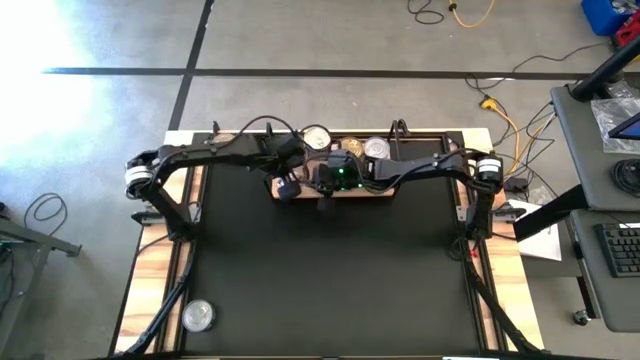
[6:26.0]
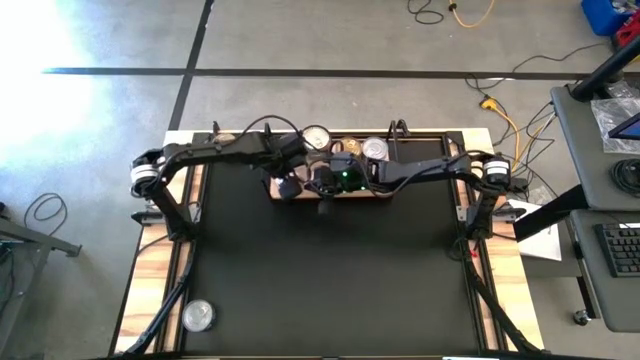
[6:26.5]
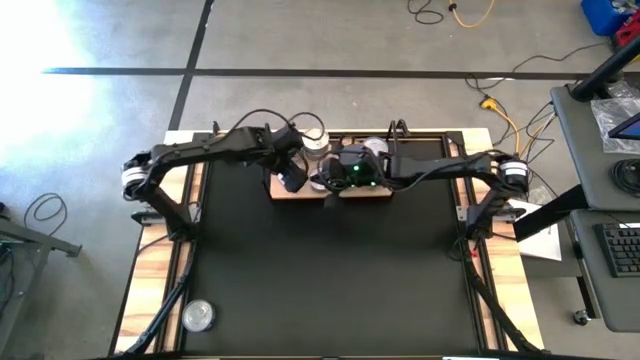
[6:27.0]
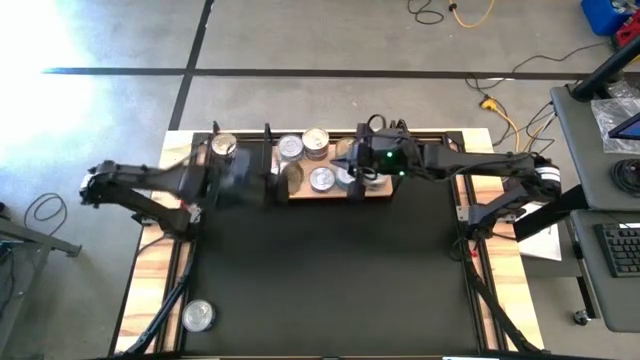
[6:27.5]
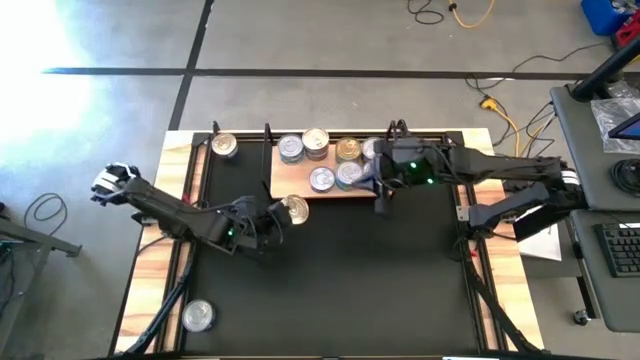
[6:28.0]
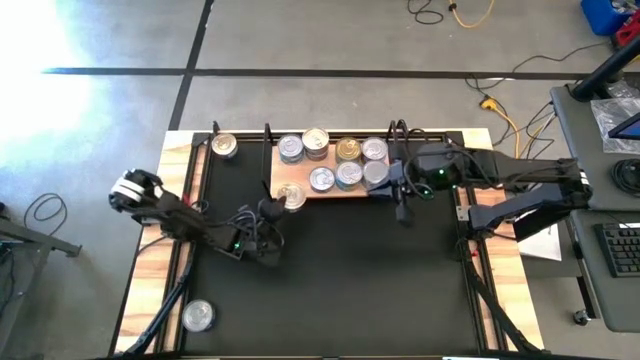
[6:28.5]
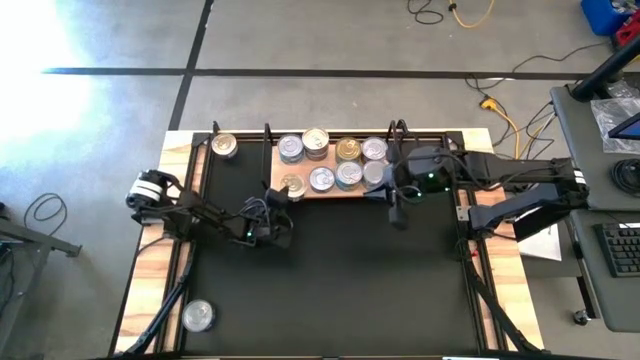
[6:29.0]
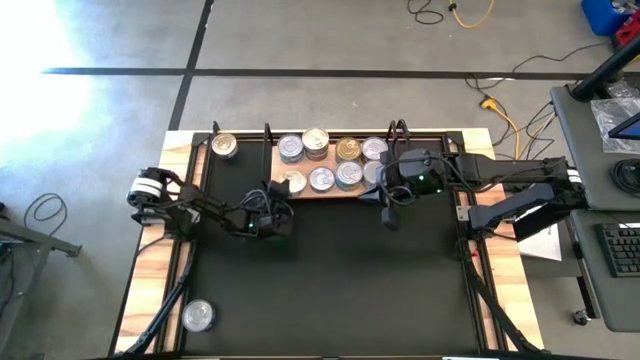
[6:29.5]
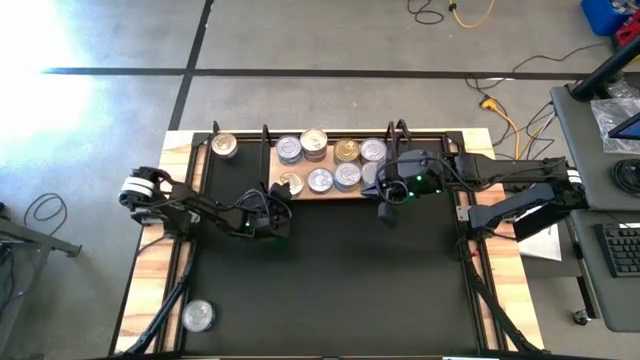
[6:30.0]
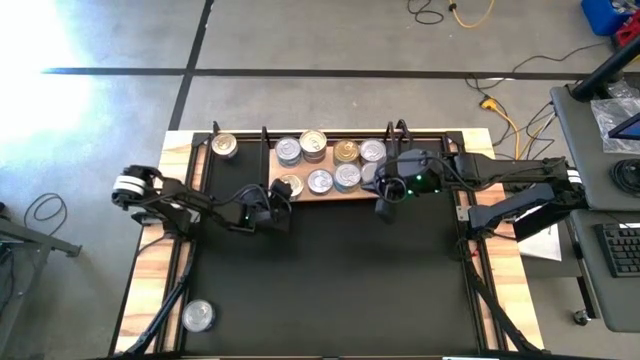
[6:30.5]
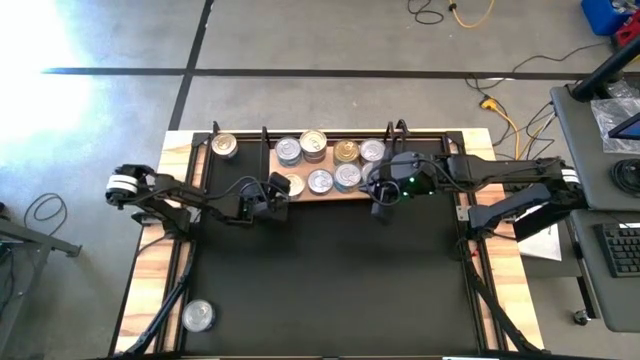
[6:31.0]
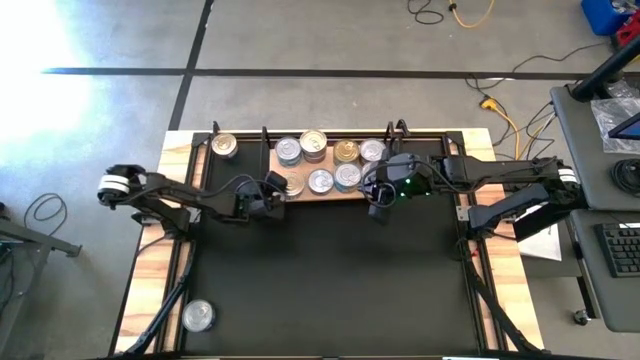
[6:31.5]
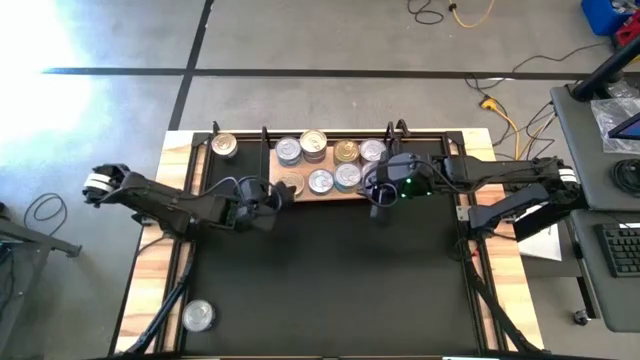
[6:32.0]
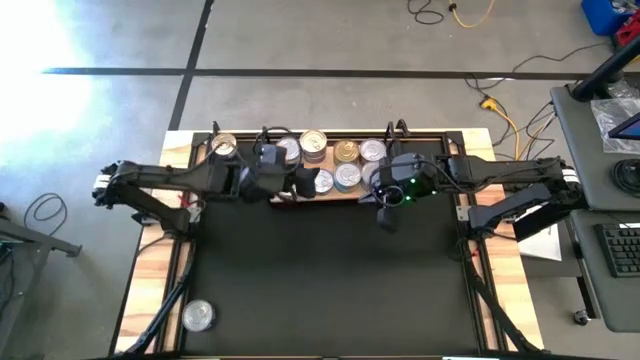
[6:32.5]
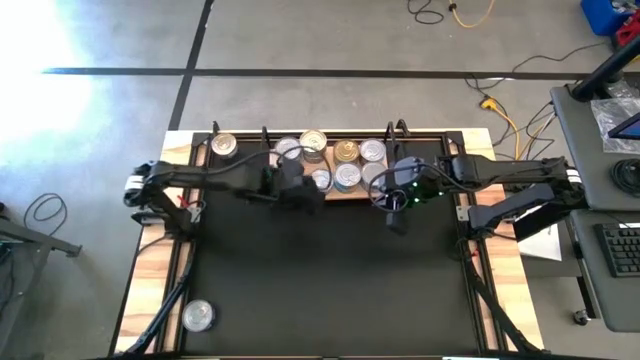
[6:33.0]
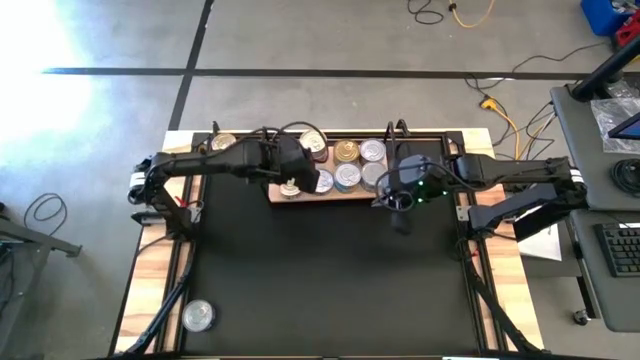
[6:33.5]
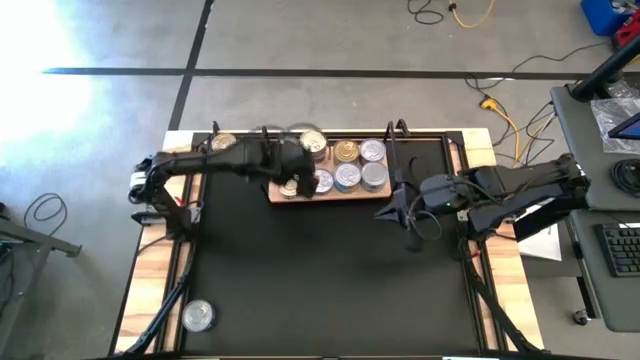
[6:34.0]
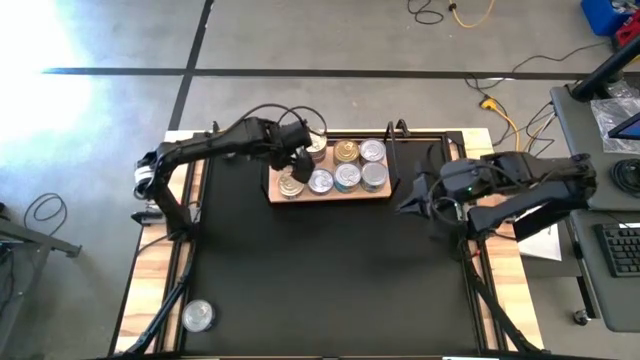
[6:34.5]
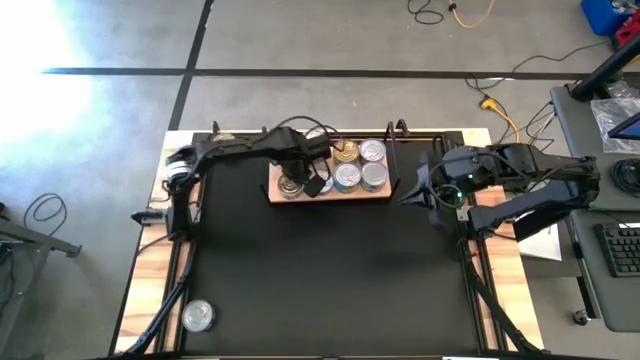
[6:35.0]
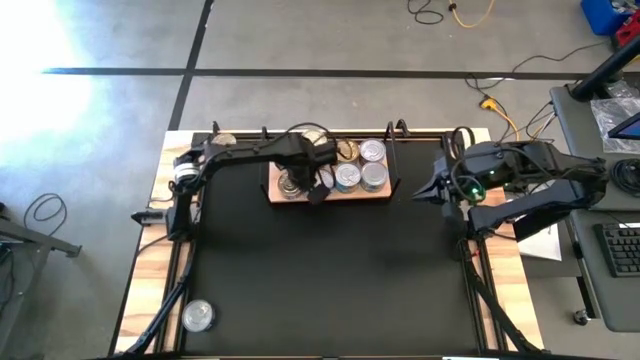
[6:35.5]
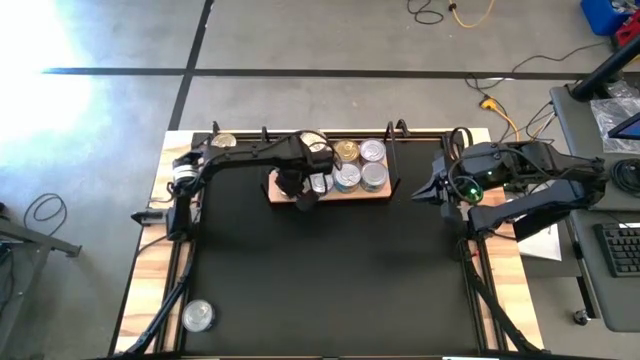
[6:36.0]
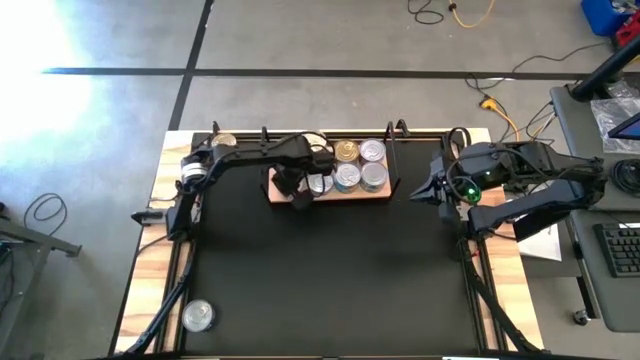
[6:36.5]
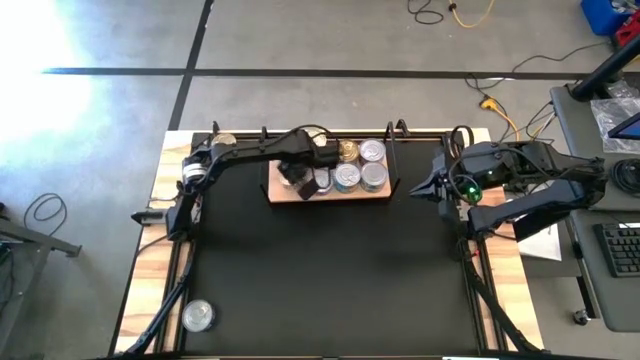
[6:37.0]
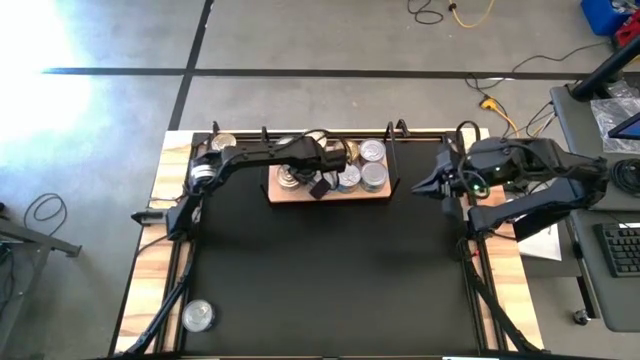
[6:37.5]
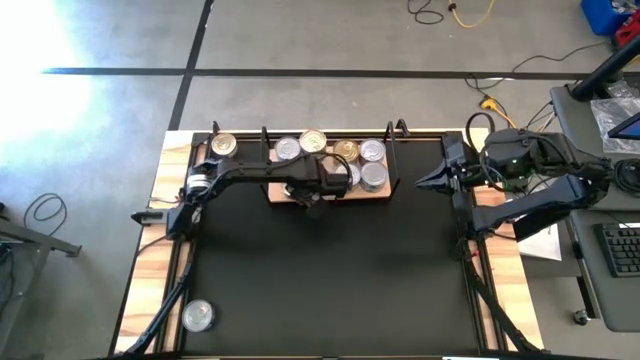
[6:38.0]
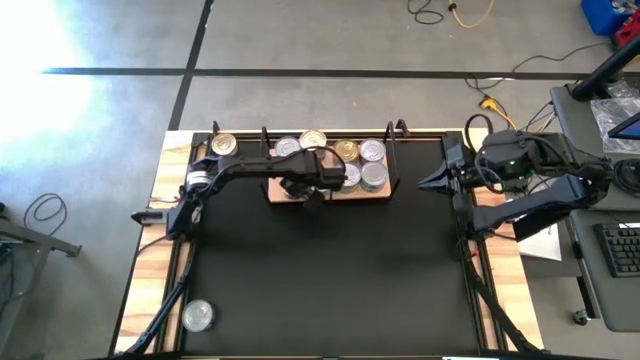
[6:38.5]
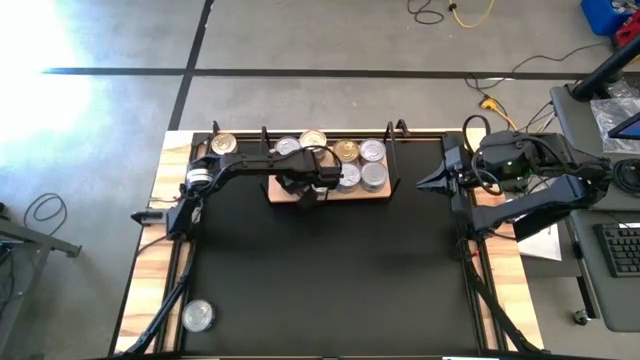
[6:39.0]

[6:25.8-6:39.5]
Task: Stack canned seafood by type on shelf
Put the blue-pink tuna can on the shelf
